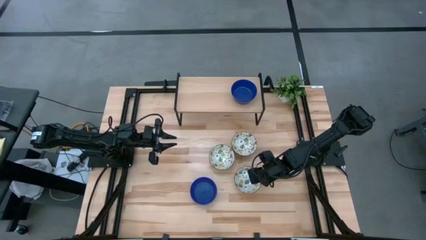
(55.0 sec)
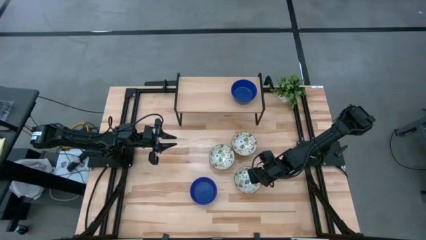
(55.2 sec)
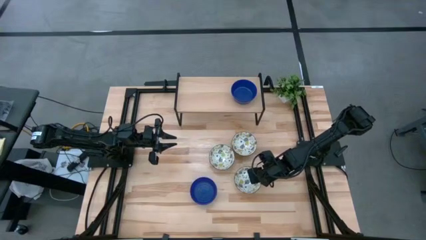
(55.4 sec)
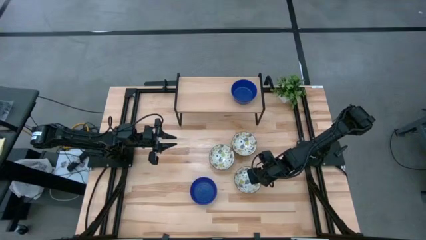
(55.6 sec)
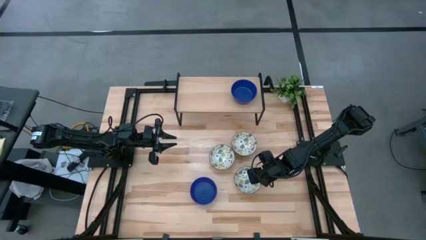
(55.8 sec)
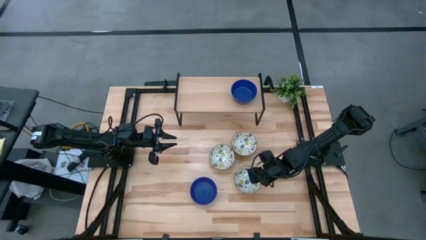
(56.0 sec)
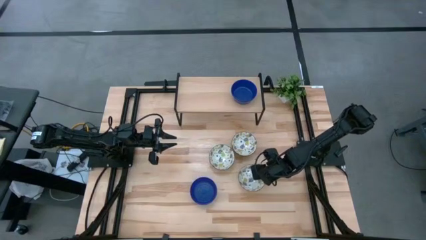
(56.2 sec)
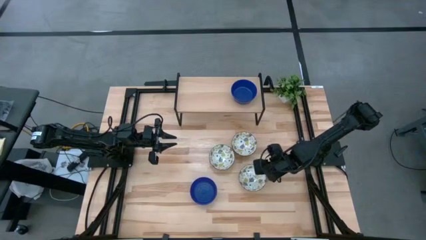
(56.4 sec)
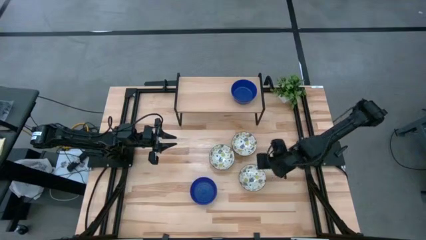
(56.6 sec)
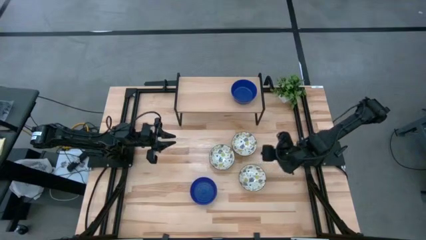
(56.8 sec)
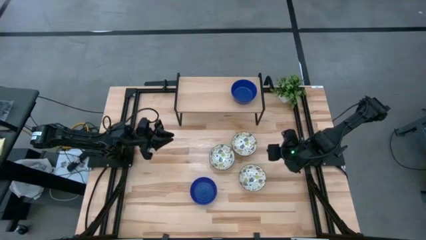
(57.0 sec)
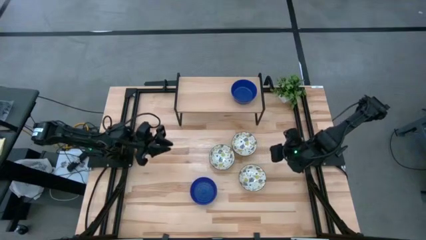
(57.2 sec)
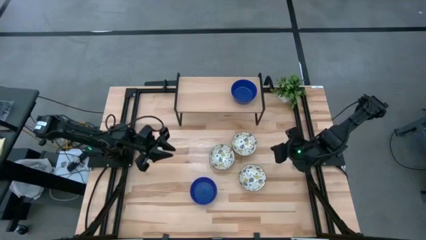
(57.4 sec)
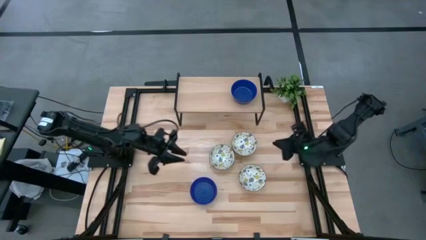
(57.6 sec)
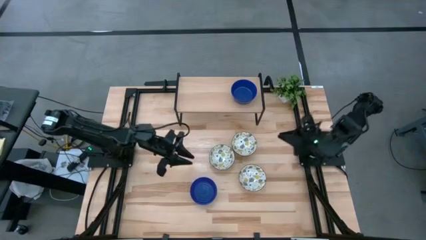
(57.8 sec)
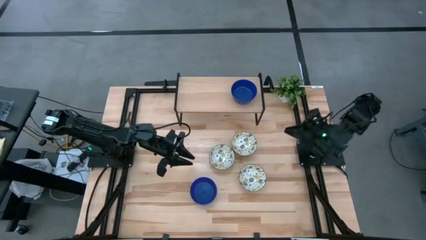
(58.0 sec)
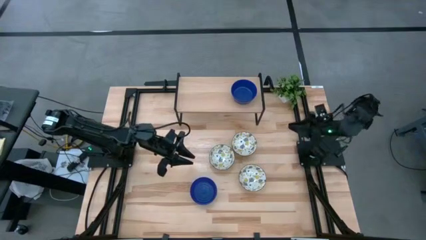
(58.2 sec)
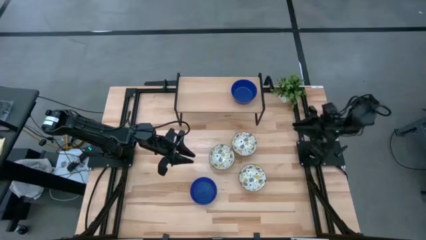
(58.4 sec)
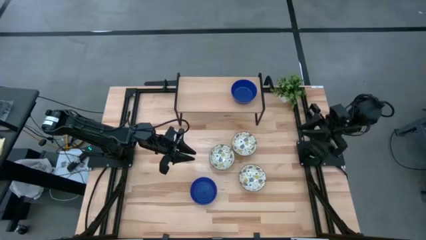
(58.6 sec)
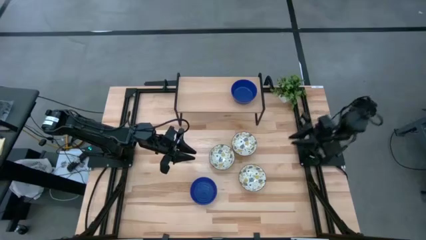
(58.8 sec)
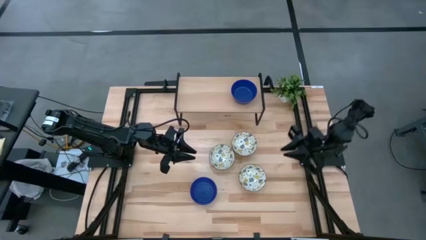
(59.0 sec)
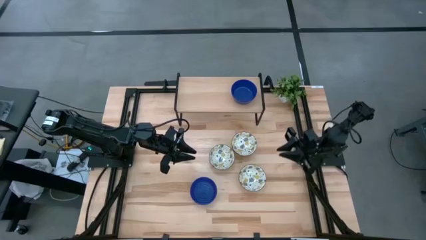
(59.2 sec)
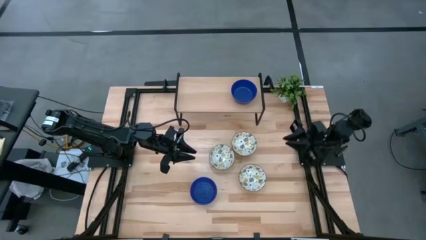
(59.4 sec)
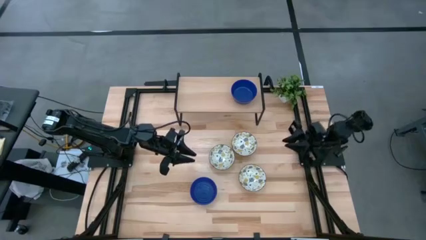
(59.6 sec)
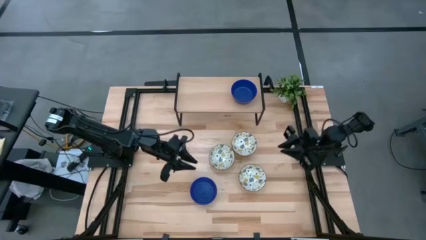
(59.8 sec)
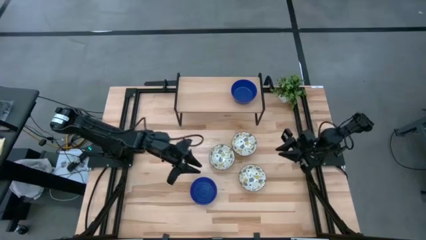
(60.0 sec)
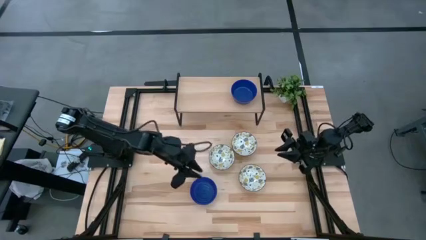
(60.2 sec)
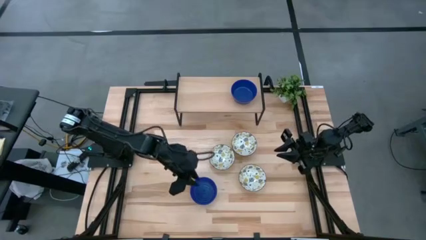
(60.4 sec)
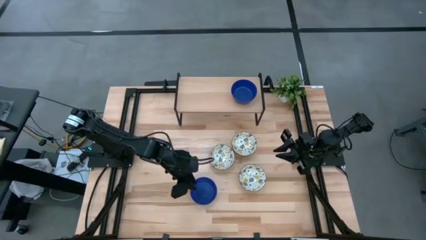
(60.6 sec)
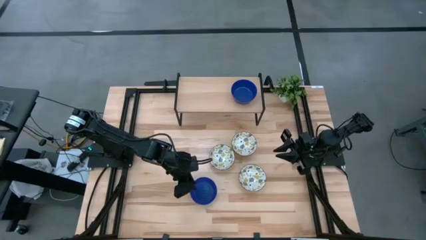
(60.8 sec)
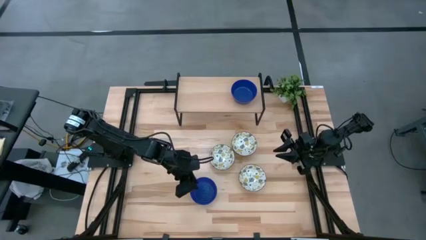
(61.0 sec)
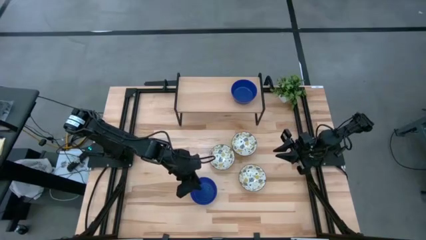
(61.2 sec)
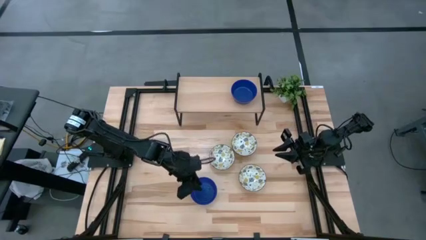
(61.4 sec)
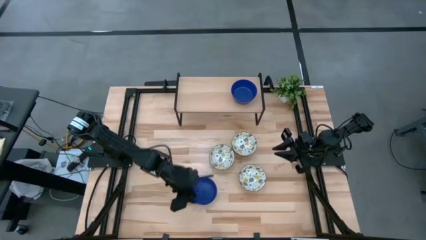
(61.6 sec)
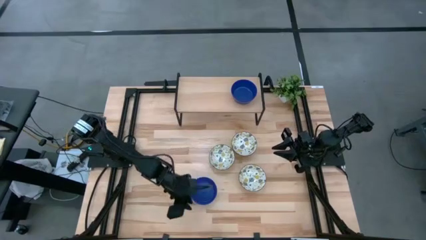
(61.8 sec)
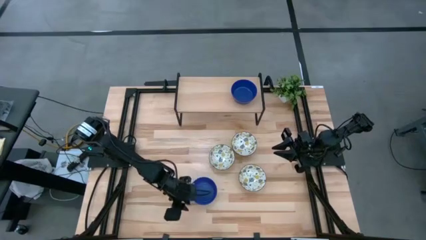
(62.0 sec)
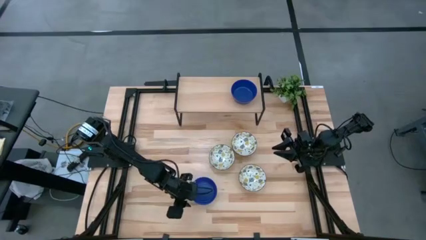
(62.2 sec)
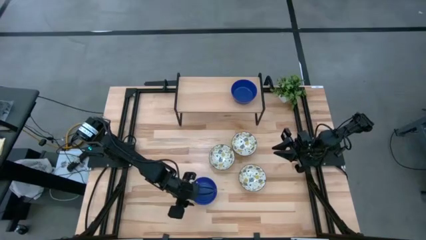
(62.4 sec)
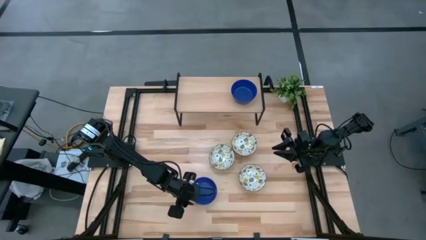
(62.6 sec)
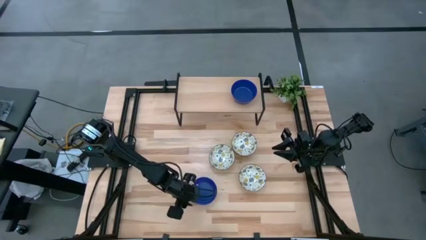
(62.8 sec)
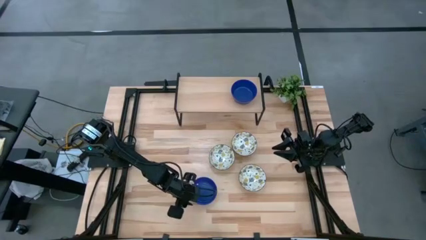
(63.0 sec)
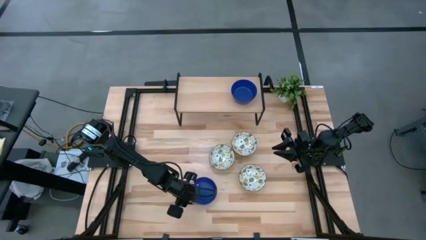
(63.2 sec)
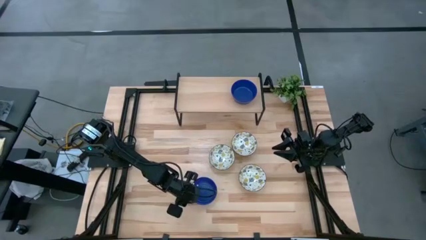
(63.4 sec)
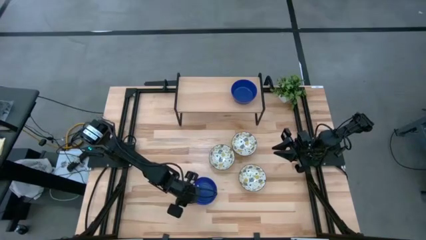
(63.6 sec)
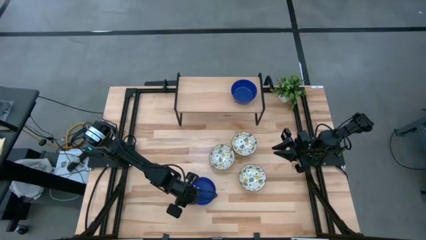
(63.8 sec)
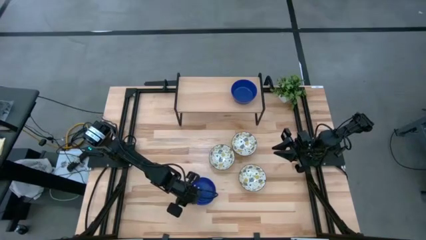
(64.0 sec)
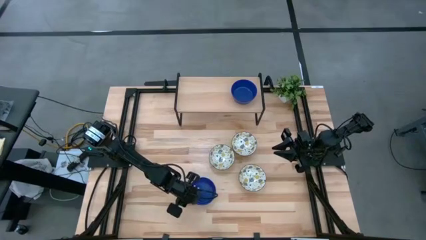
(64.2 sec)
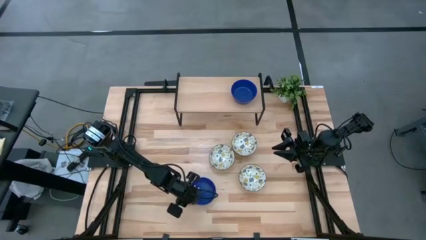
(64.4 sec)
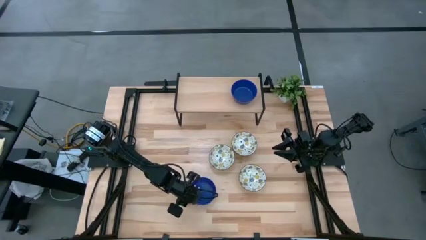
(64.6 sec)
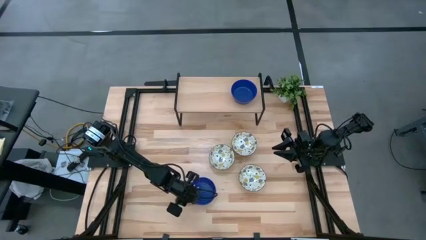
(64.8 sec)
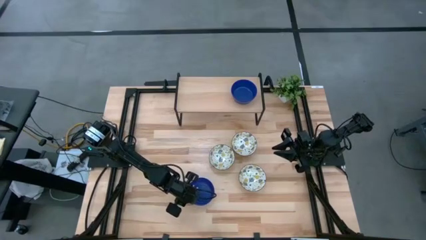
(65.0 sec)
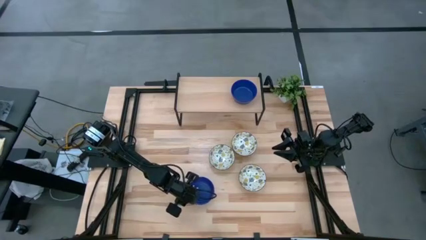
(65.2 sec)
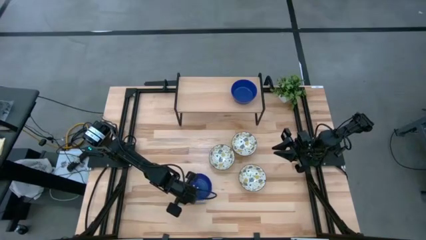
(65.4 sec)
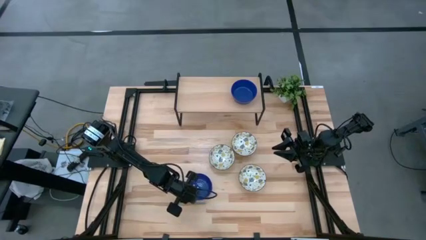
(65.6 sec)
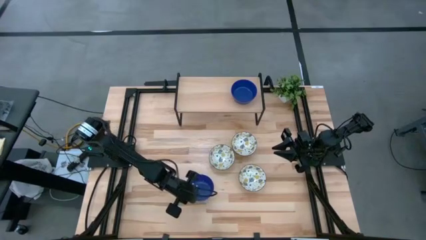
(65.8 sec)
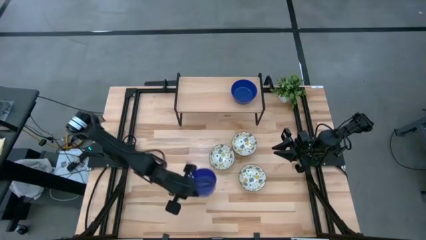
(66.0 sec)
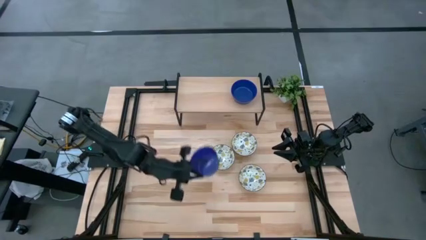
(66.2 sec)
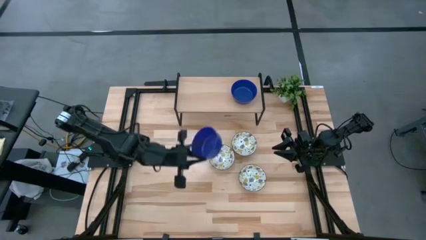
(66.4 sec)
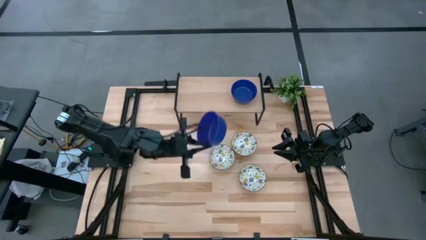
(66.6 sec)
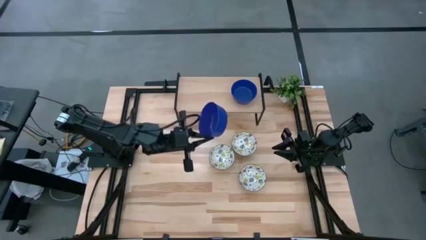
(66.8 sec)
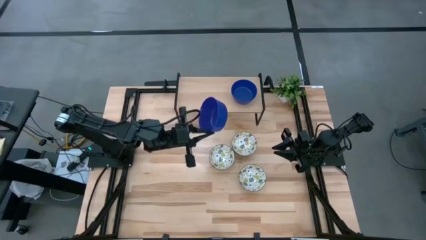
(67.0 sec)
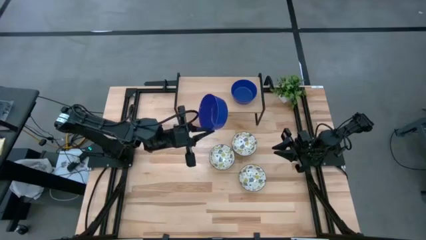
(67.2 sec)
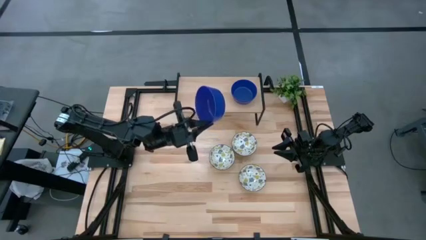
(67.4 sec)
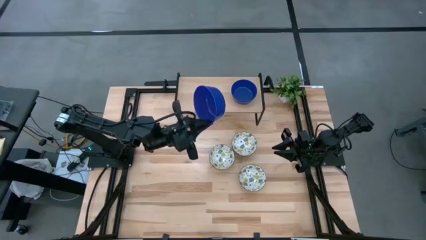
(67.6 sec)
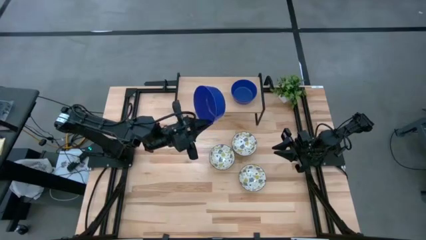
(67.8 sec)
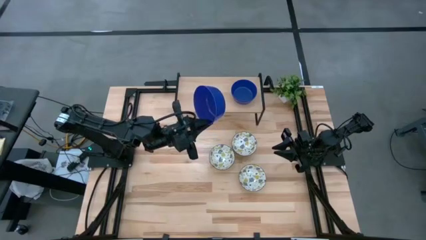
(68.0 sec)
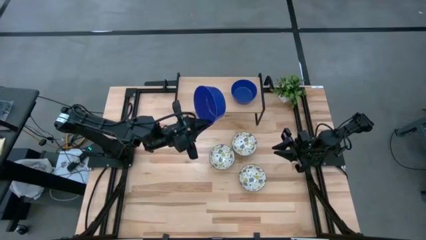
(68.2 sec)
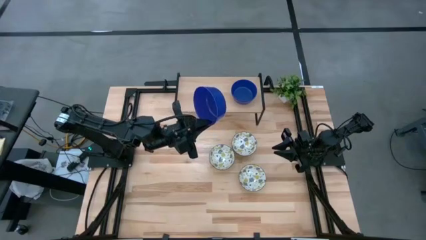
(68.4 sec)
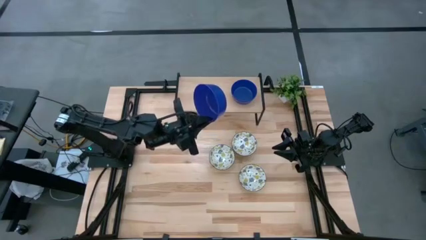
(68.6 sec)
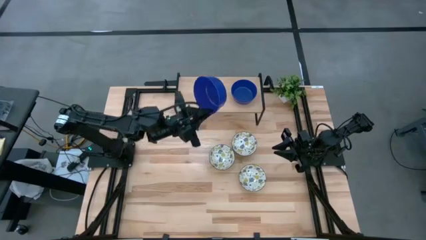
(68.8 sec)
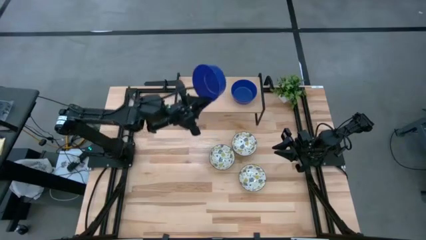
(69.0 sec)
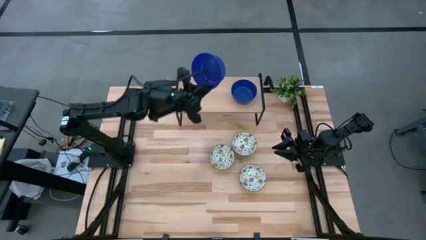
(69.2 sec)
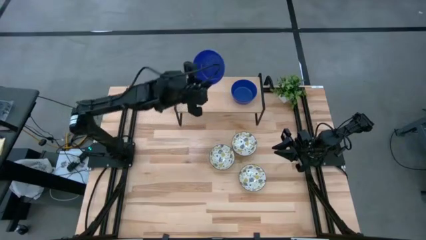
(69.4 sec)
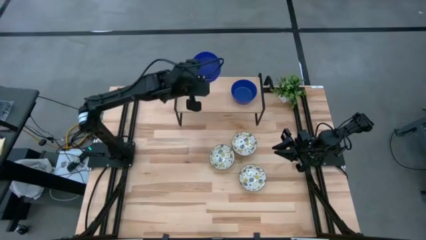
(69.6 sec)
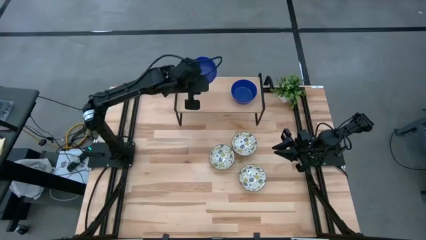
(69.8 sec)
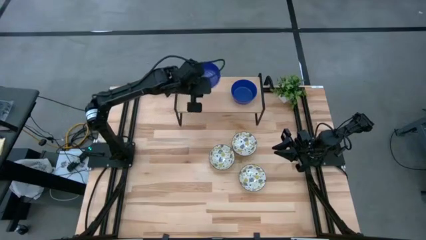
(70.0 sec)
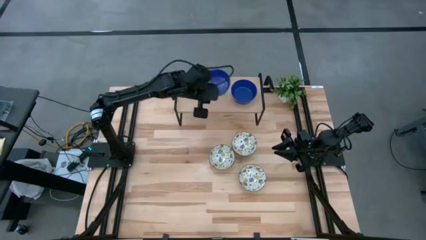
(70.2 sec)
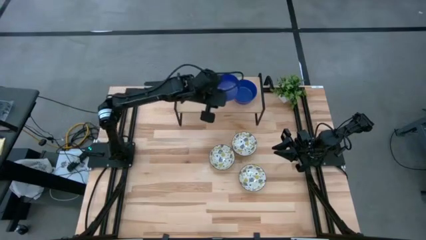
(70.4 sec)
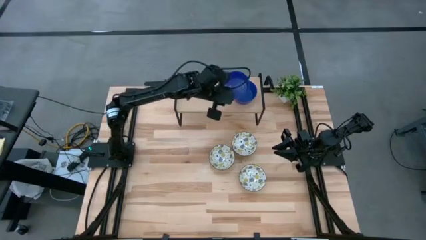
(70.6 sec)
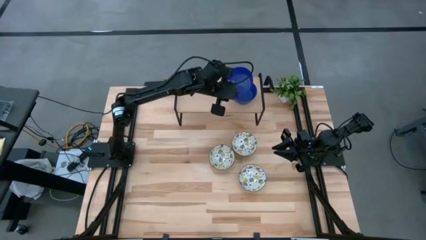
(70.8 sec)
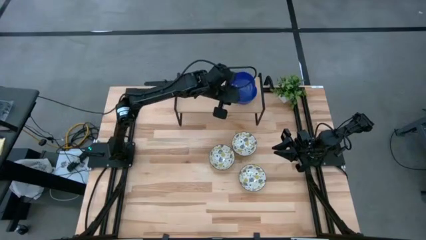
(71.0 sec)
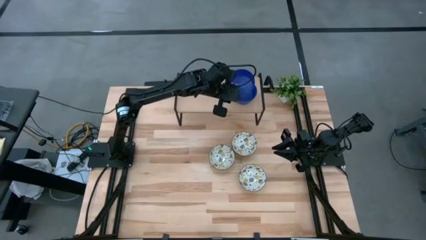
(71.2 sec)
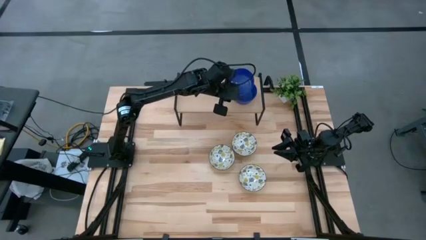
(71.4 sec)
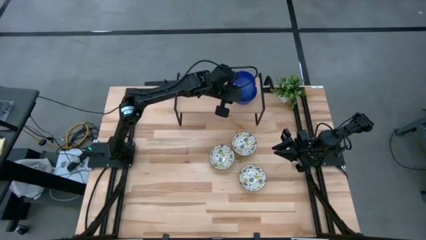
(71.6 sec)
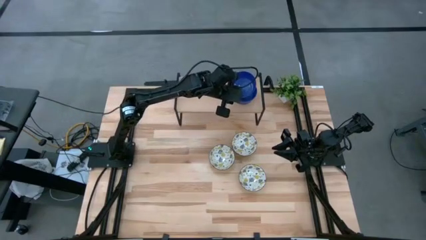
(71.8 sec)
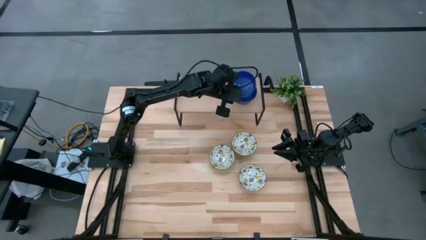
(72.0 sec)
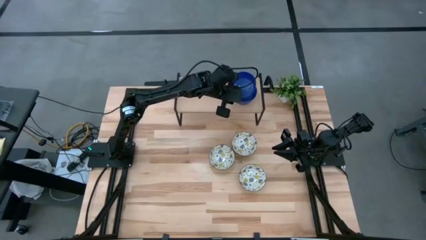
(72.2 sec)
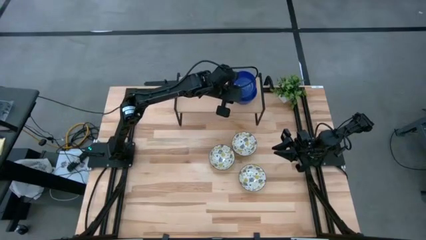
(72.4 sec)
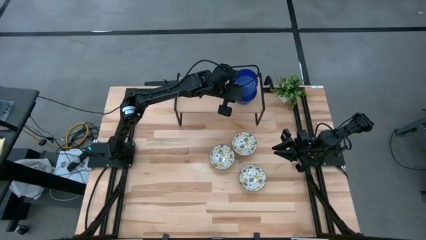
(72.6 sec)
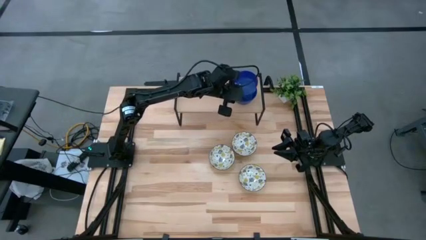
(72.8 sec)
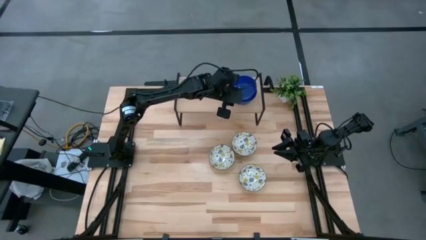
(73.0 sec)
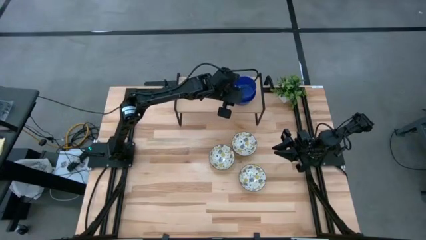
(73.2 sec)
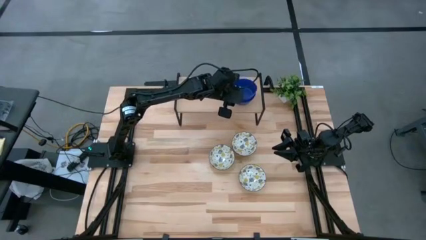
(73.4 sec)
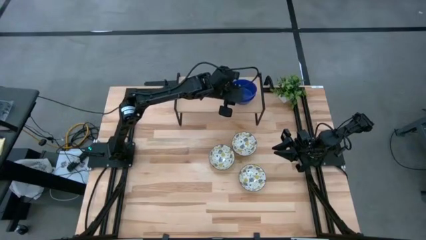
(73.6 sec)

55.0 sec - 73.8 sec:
Task: Pick & Place Mini bowls
Stack the blue bowl on top of the blue bowls on the shelf
